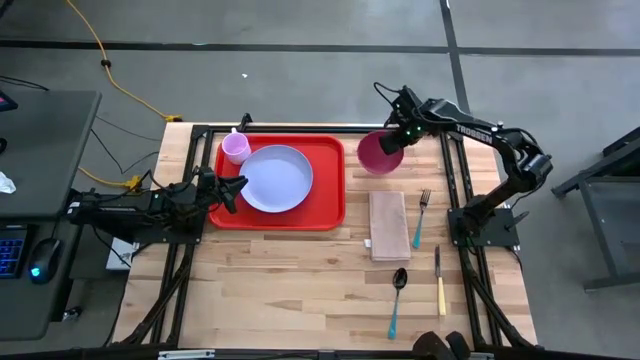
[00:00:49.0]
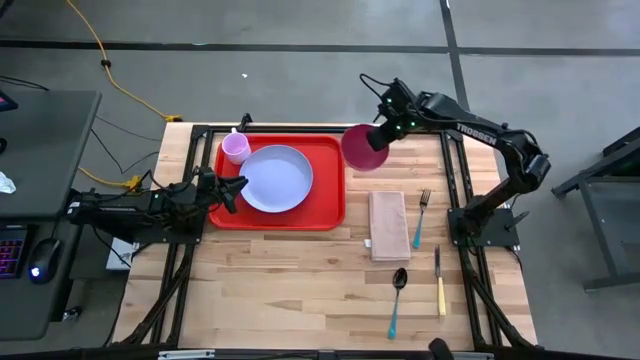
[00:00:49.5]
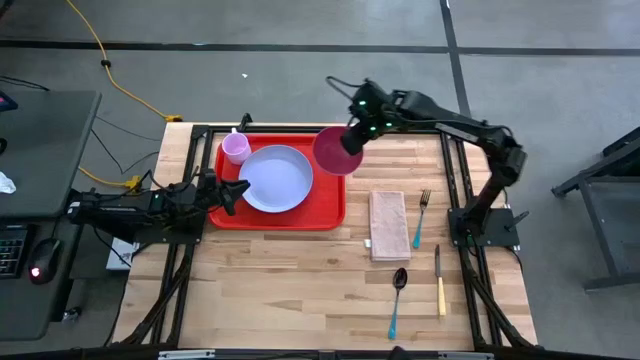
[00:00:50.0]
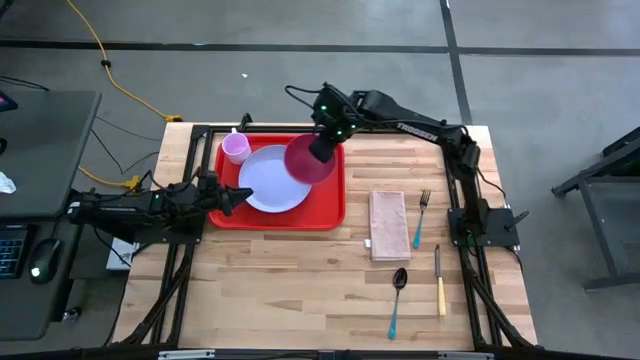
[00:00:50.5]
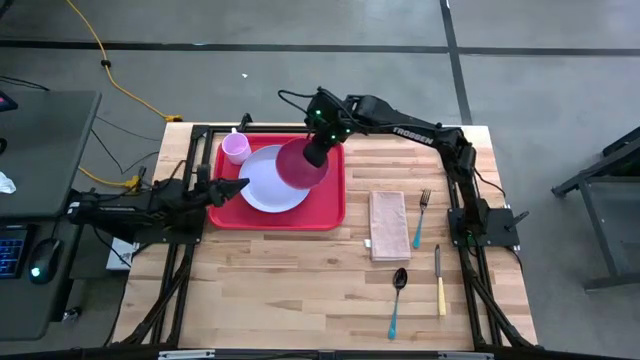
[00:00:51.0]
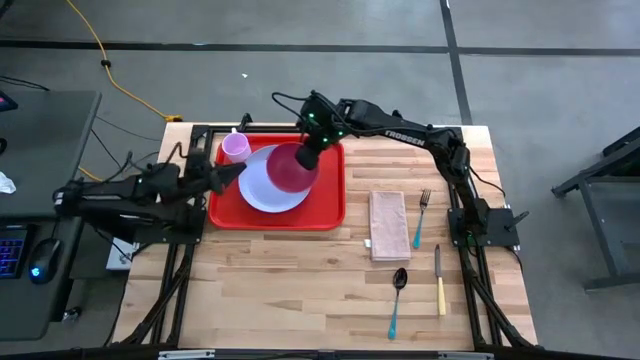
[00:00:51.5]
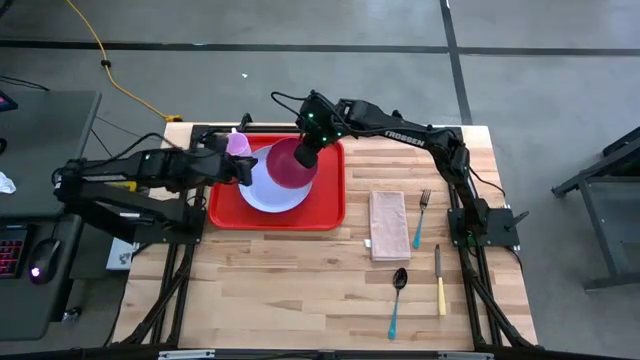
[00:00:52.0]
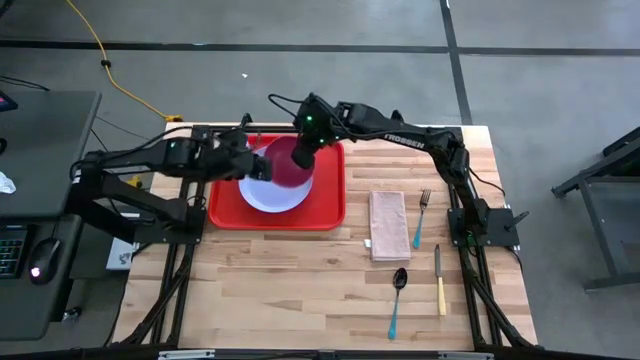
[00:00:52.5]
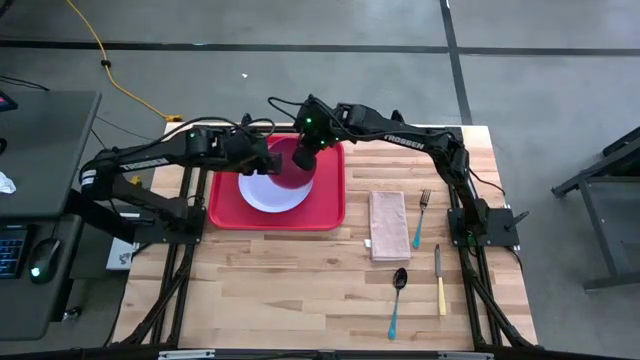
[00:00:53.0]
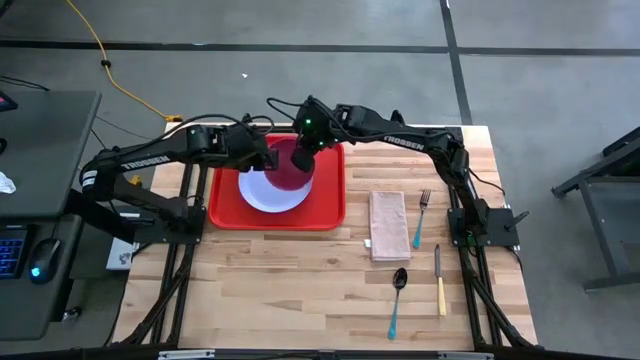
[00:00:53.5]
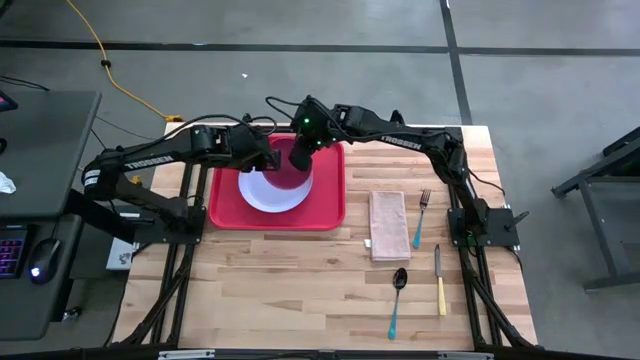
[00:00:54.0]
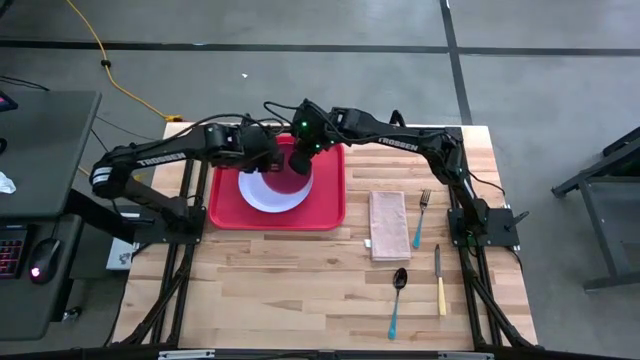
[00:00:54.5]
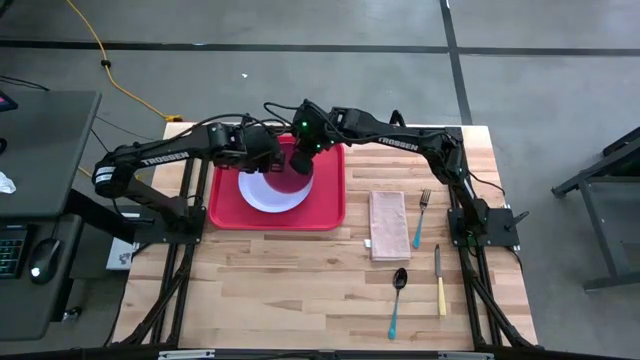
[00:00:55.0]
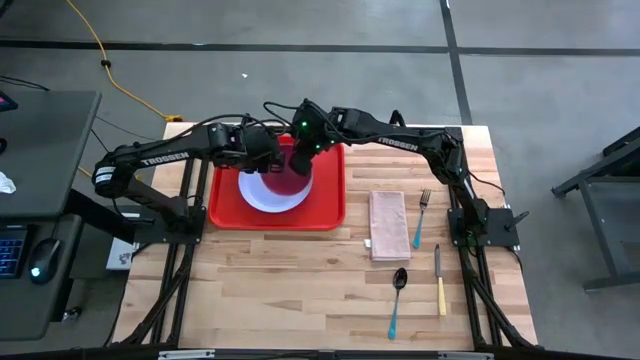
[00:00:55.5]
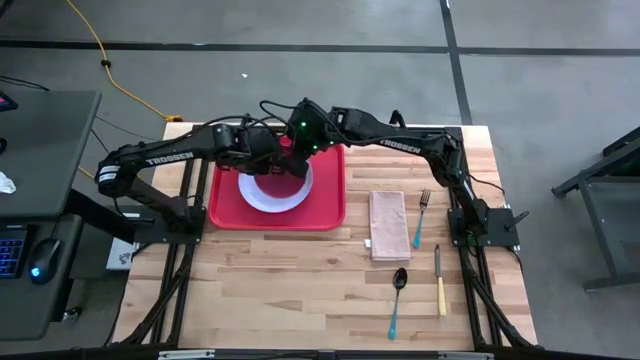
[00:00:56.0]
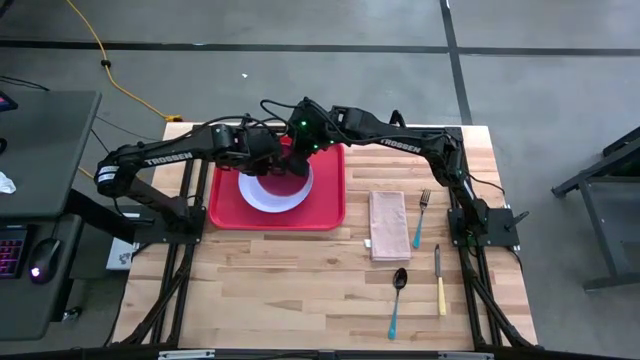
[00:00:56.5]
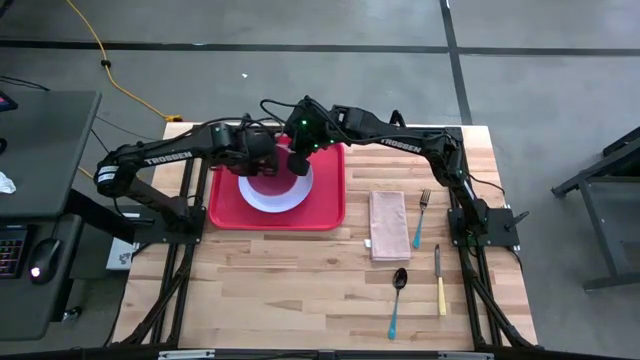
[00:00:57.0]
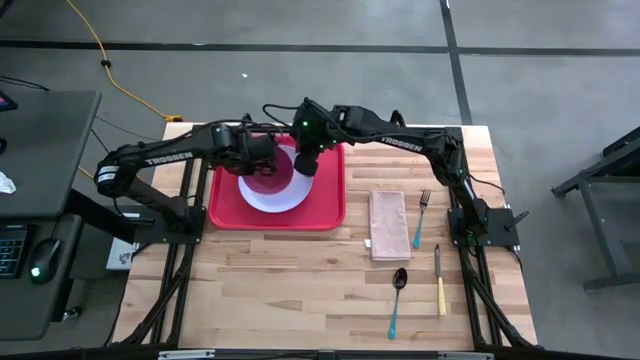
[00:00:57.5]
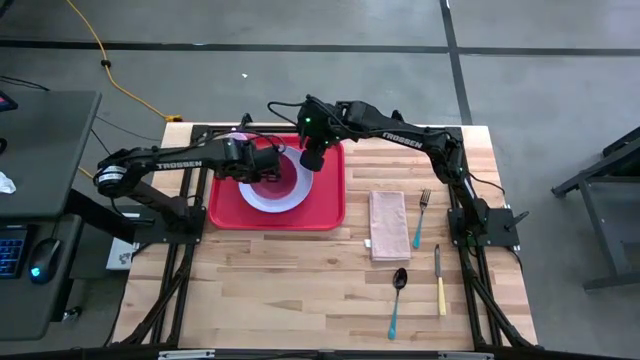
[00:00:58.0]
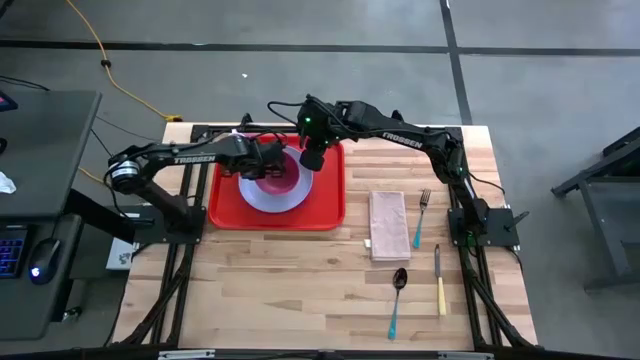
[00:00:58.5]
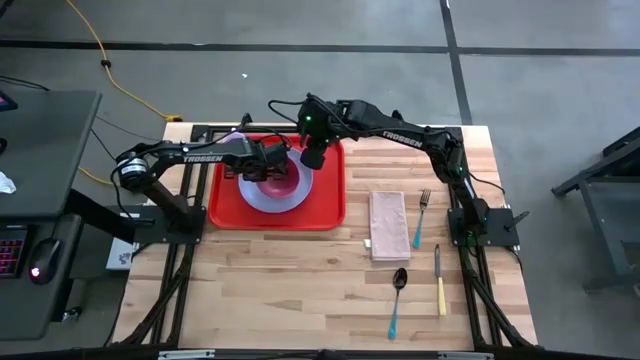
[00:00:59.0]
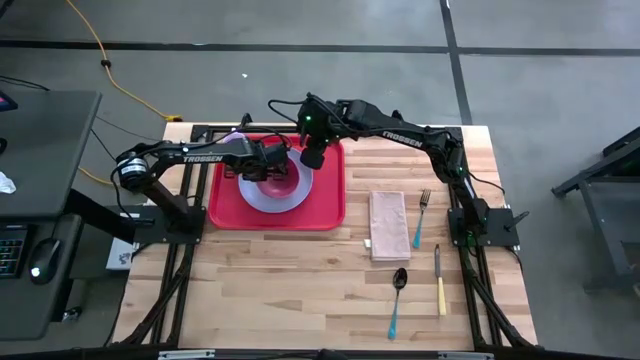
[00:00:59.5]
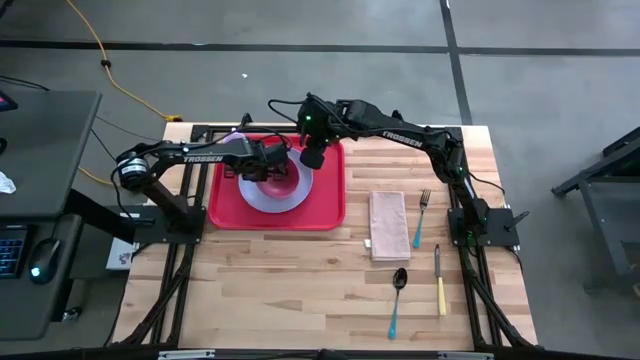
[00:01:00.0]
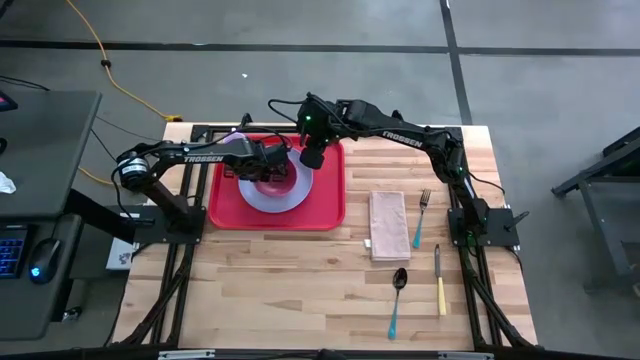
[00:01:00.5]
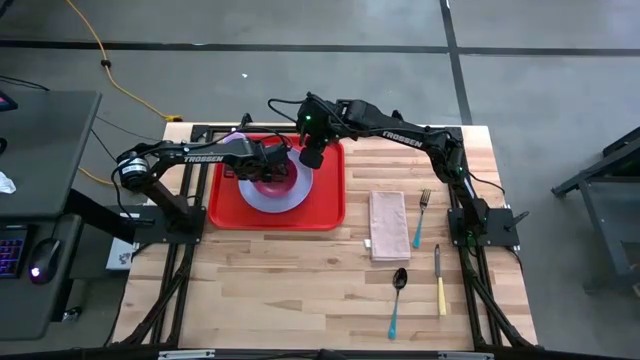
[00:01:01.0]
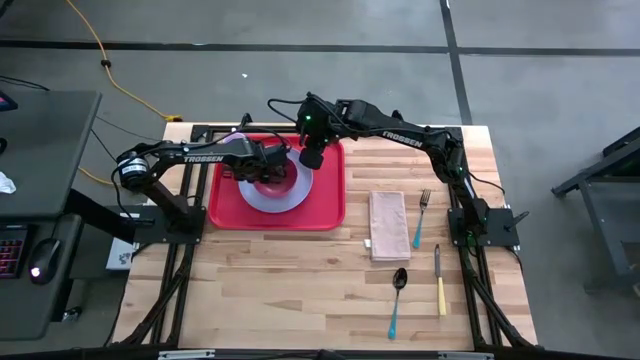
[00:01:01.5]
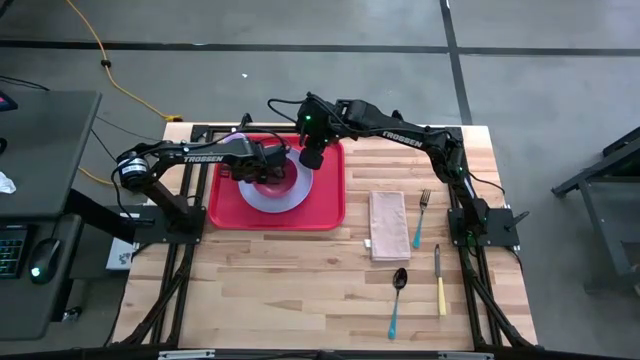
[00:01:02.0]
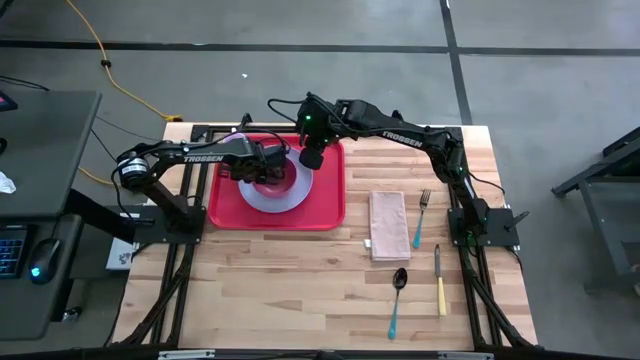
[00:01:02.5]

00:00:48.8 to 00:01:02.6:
Task: Set up tray
Put the pink bowl on the light purple plate

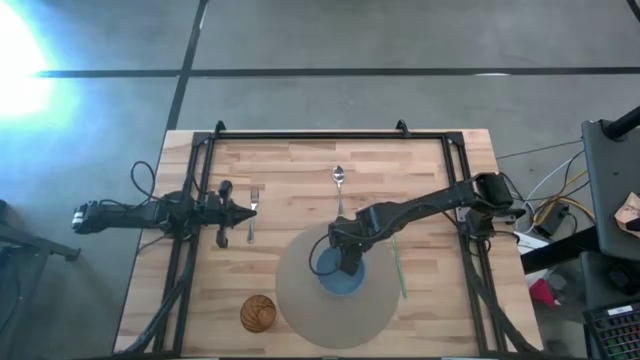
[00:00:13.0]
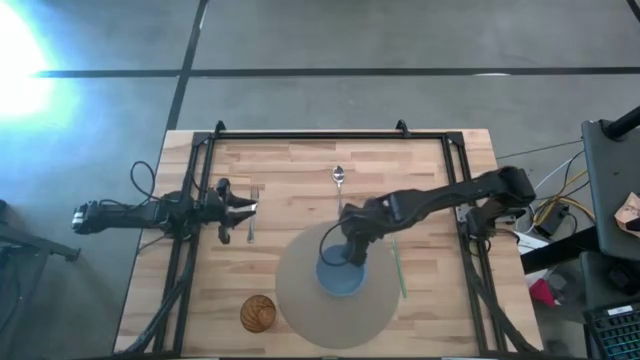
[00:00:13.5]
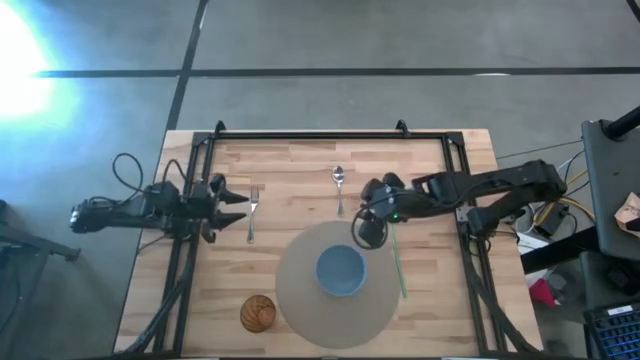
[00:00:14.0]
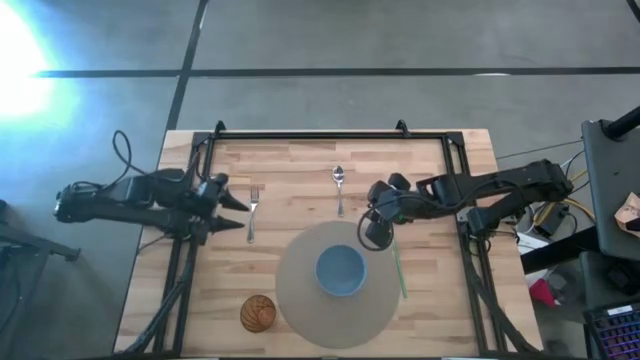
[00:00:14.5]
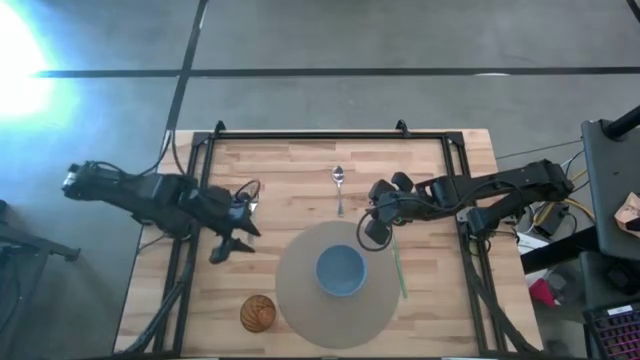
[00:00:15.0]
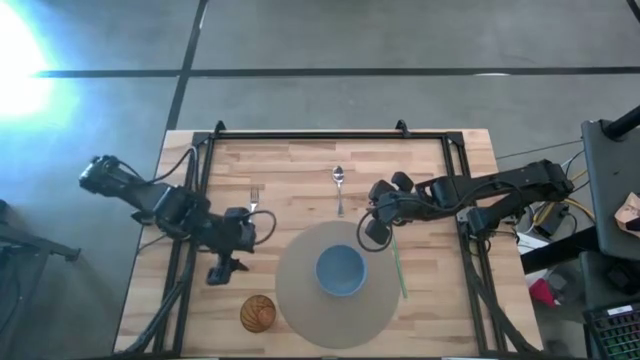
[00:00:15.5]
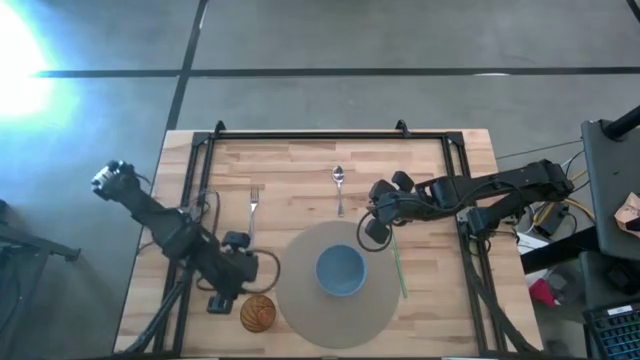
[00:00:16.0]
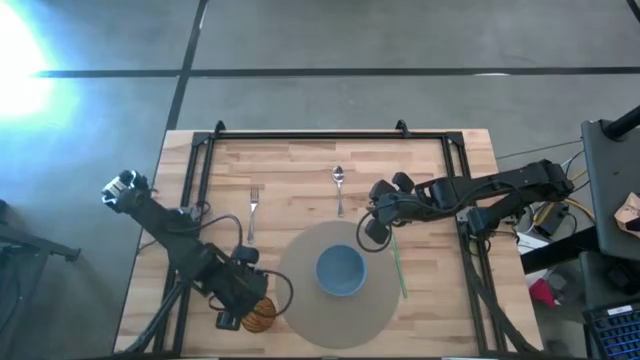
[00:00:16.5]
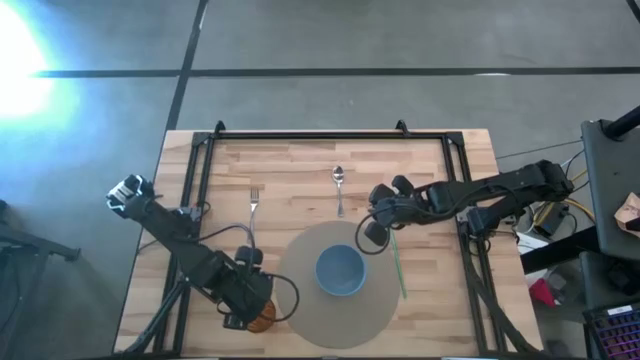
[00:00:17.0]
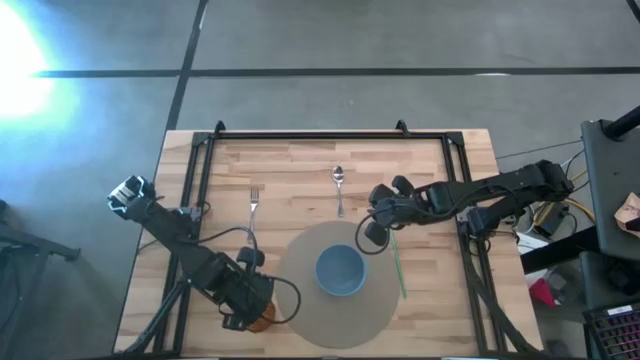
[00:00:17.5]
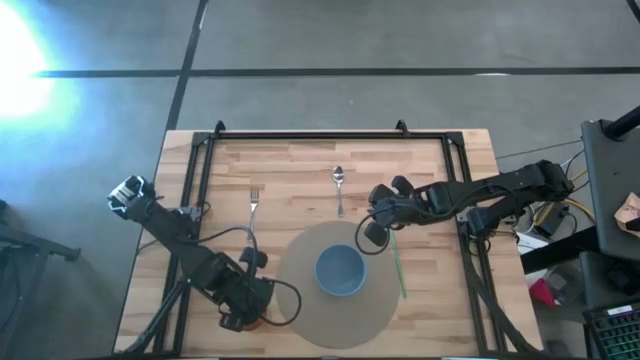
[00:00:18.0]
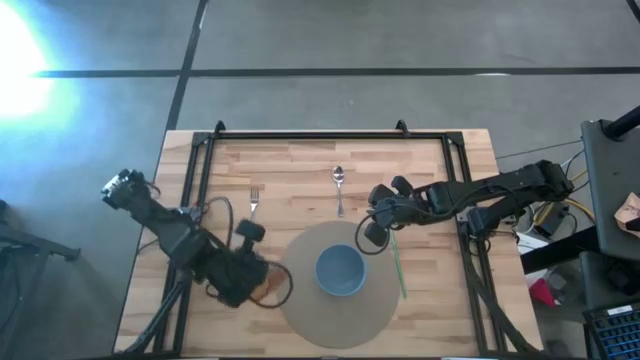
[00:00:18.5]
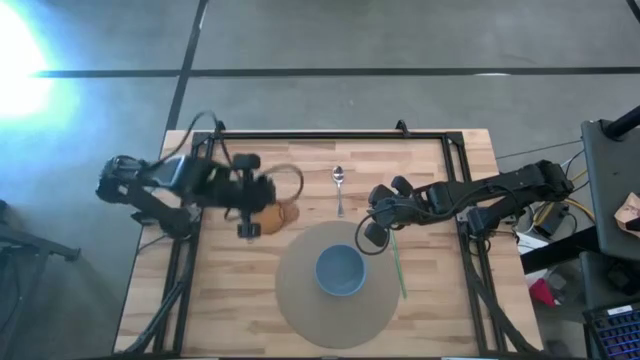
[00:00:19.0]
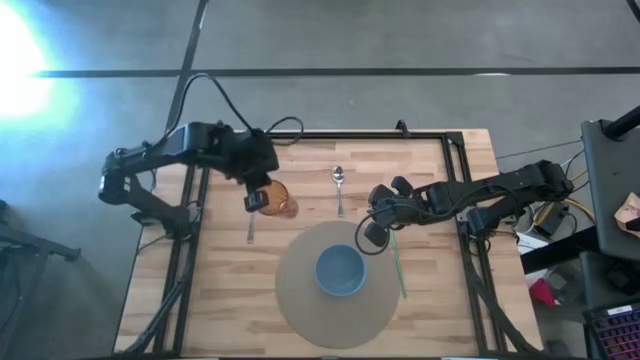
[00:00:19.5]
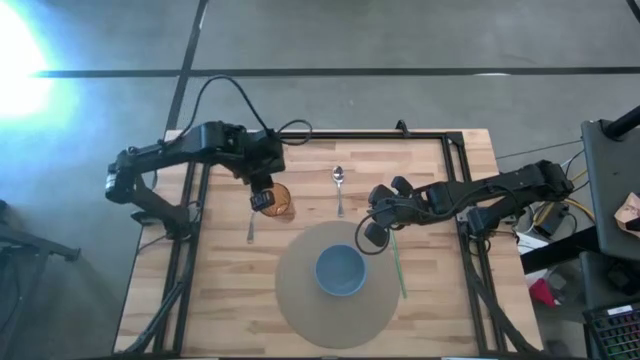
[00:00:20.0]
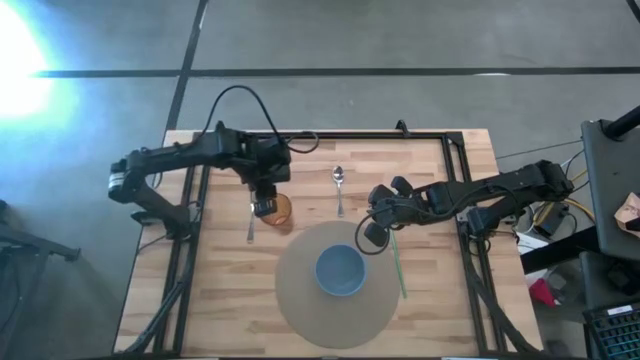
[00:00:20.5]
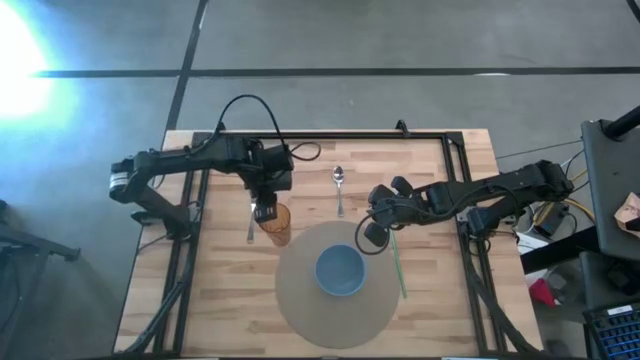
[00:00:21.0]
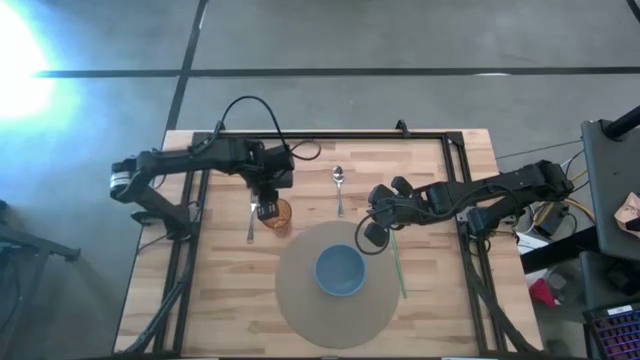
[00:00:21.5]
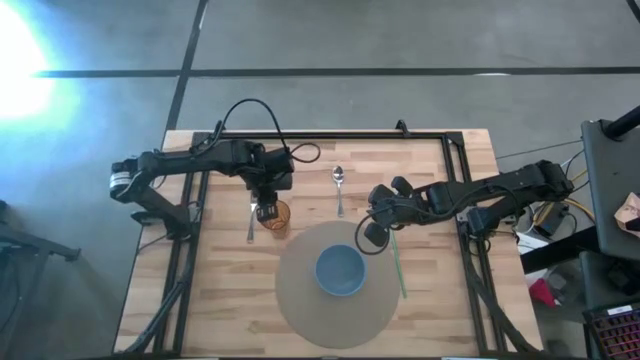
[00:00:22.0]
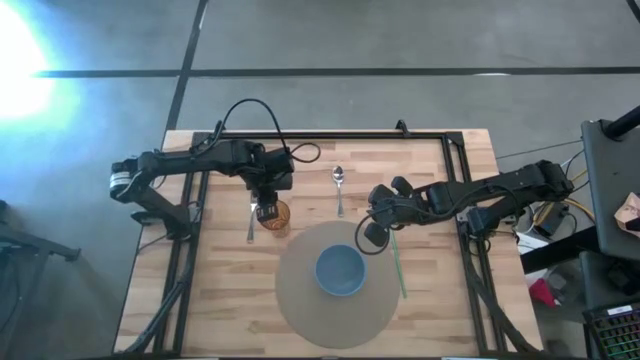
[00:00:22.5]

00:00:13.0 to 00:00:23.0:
Task: Pick & Place Utensil
Put the gray cup to the top left of the table mat
